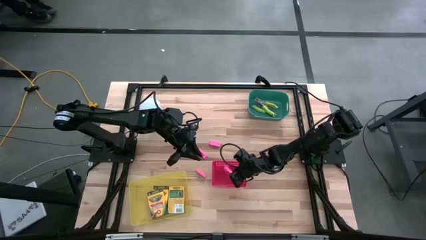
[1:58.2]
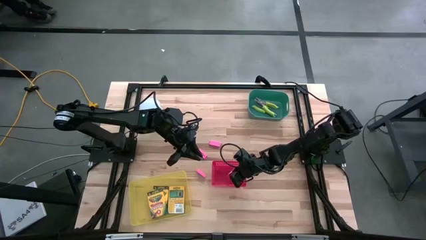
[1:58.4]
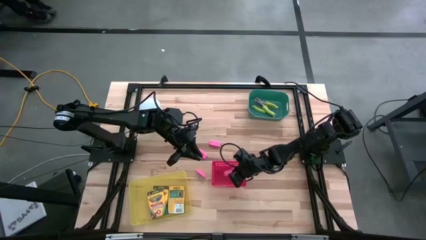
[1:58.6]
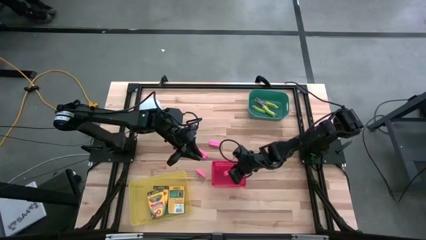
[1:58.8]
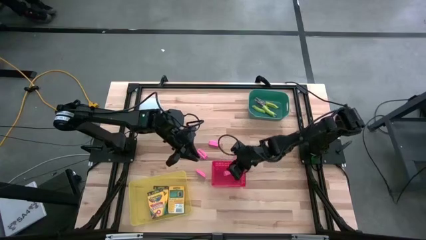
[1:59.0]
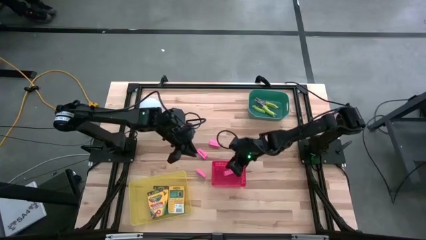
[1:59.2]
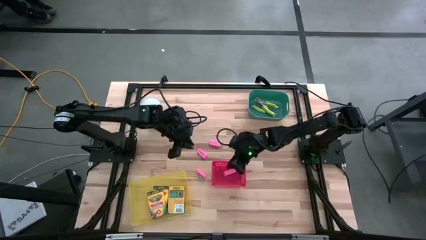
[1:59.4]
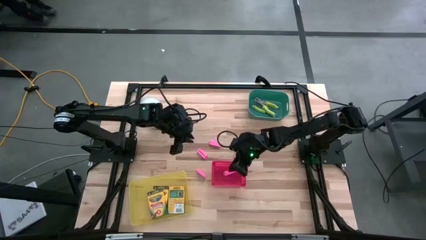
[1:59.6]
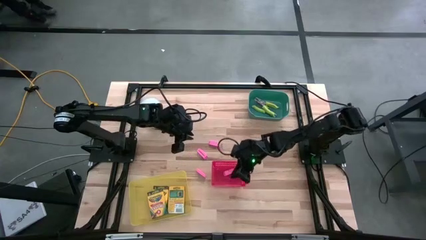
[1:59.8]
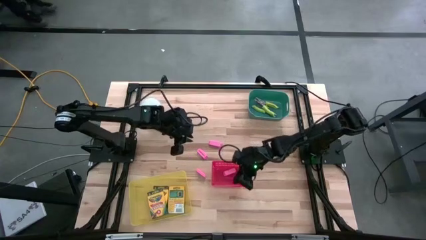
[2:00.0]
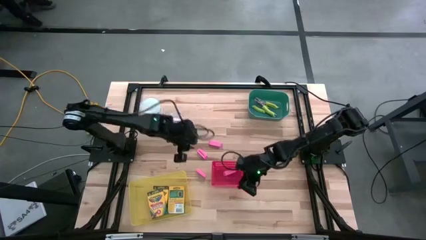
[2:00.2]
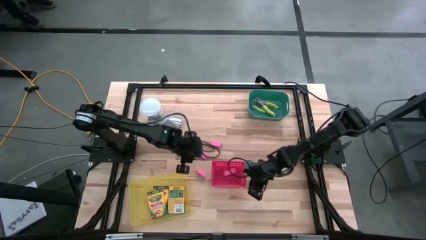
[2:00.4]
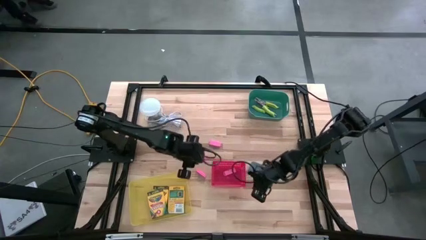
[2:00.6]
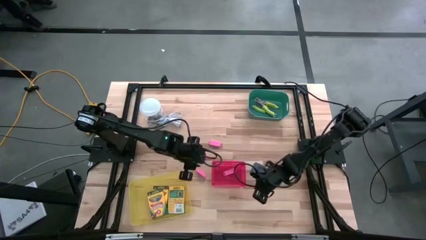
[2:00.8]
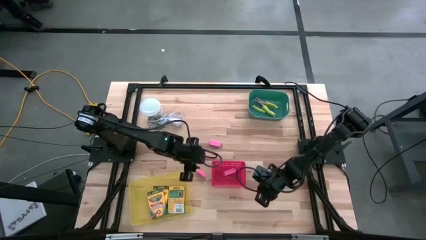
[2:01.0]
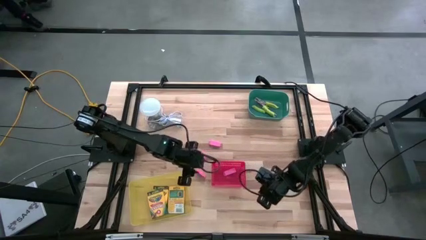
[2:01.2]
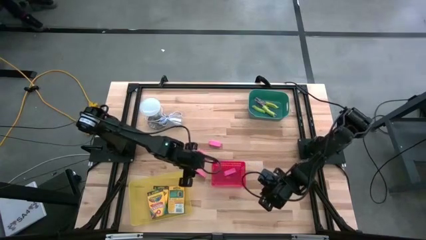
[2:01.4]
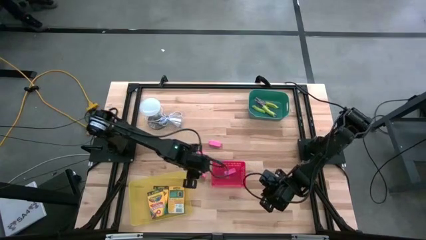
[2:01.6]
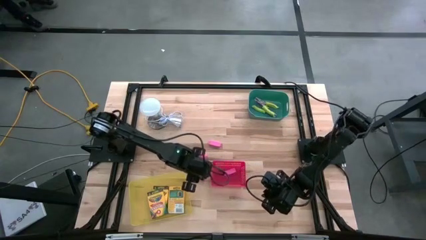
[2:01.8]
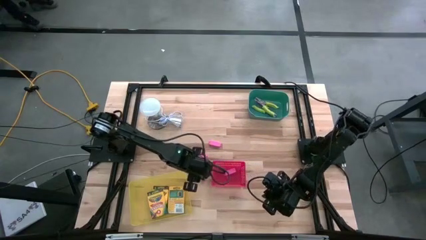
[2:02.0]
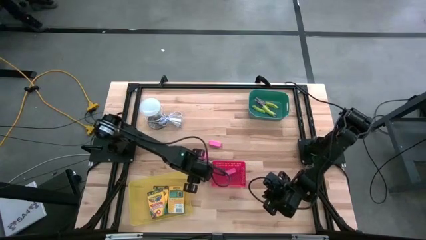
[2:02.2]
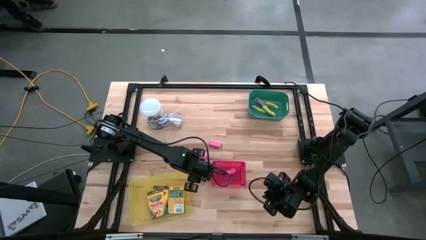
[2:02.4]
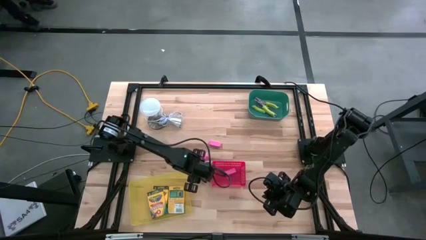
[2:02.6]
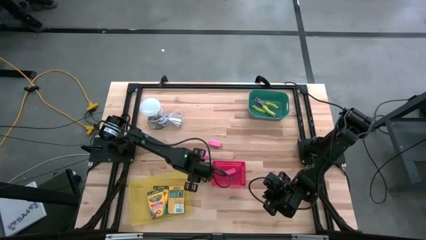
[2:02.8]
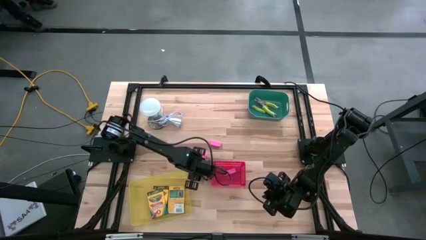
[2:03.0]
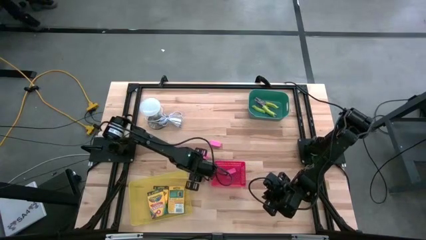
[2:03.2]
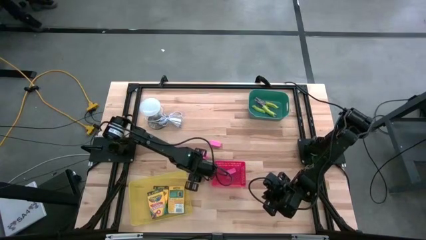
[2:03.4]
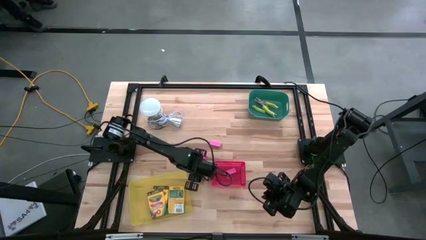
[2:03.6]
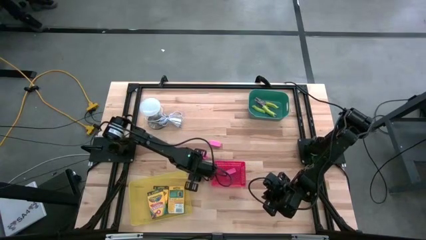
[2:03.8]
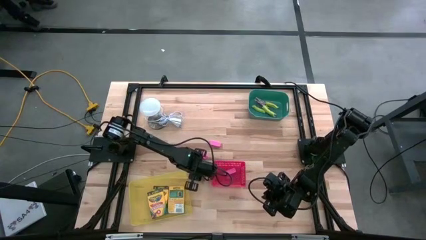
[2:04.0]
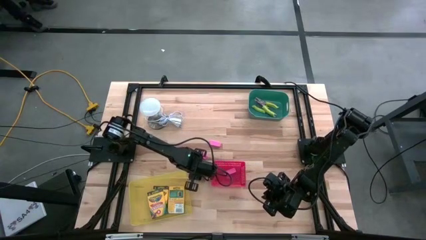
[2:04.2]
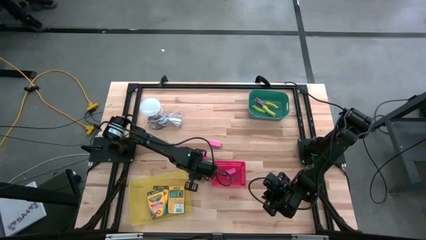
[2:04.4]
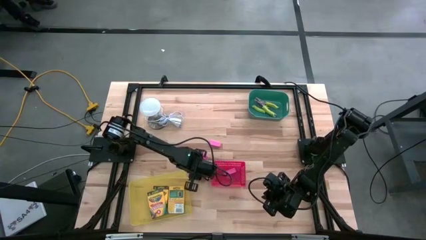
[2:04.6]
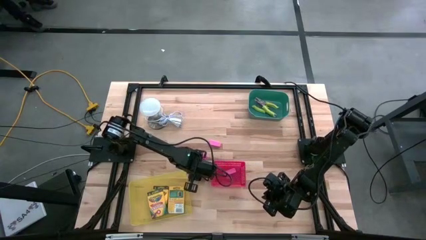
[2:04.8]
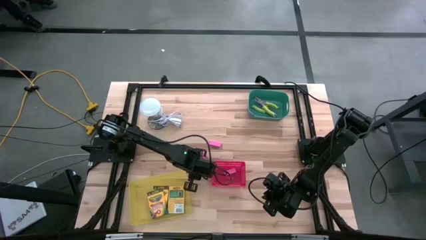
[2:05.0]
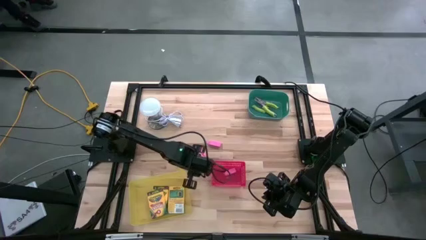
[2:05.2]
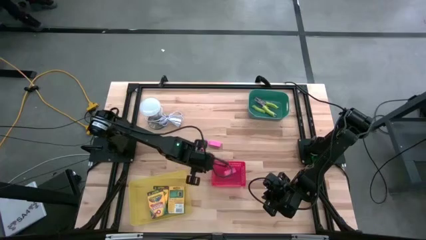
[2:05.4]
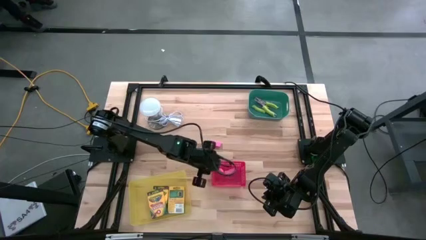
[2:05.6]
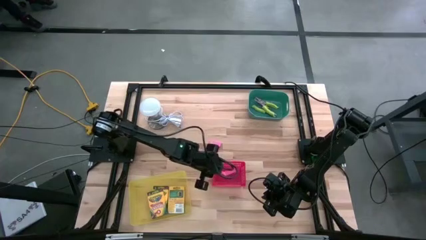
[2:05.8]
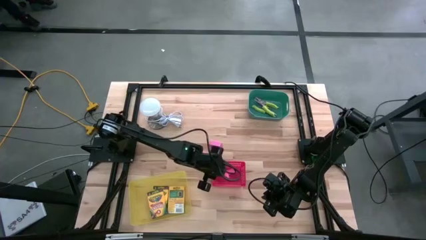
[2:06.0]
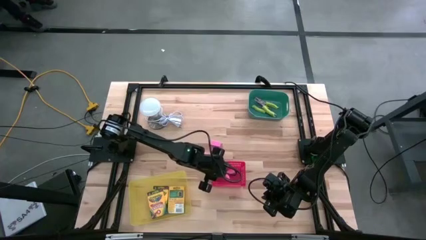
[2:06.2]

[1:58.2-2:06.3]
Task: Pick & Place School Supplies
Put the pink eraser into the red bin

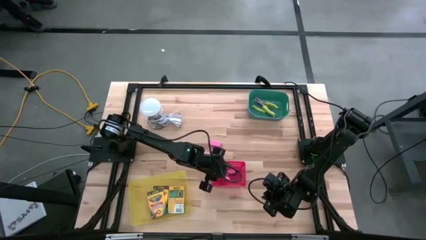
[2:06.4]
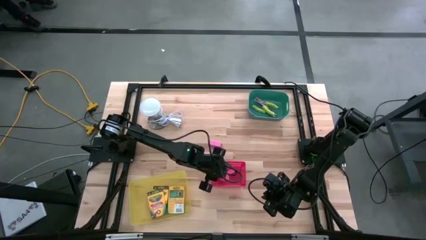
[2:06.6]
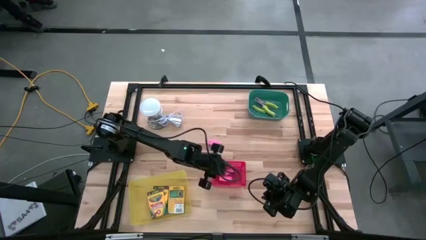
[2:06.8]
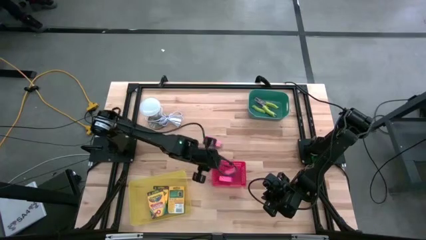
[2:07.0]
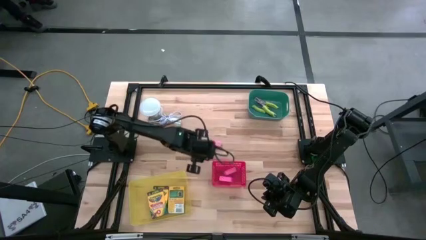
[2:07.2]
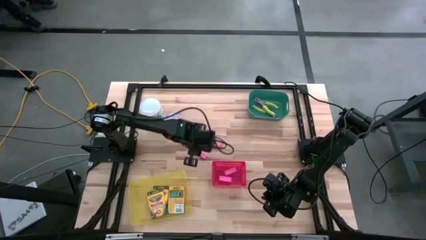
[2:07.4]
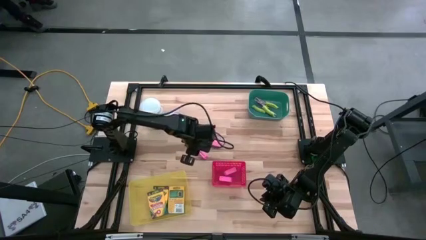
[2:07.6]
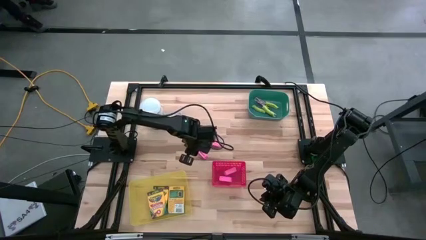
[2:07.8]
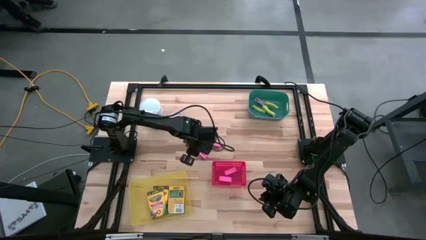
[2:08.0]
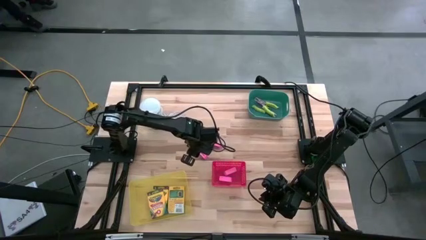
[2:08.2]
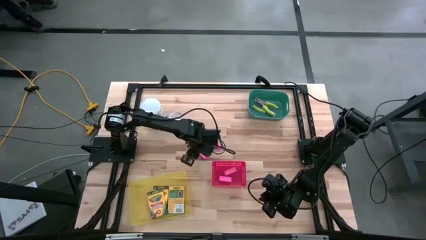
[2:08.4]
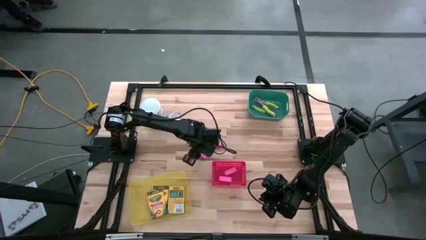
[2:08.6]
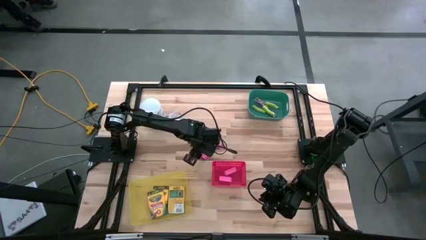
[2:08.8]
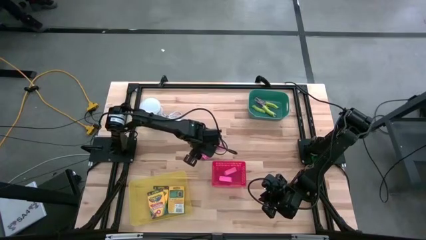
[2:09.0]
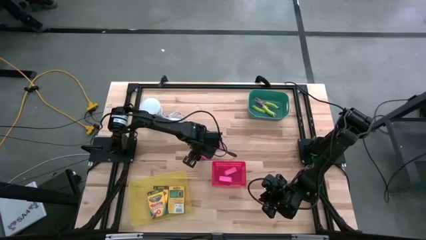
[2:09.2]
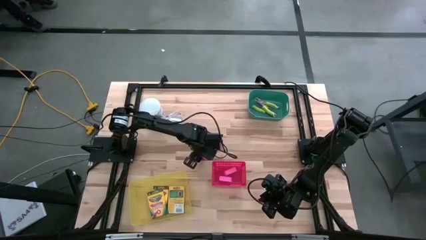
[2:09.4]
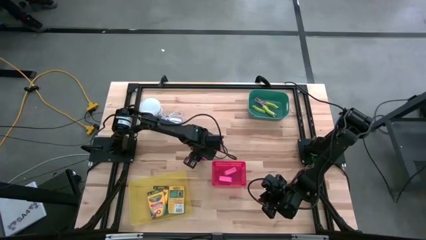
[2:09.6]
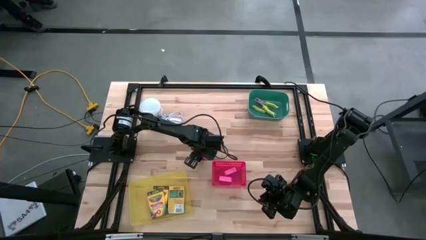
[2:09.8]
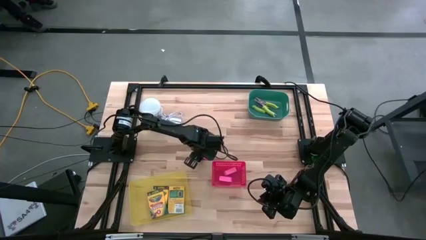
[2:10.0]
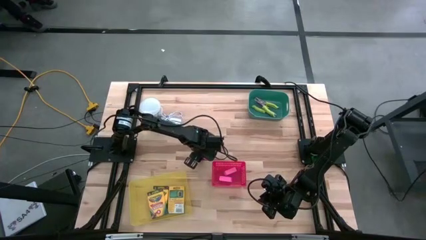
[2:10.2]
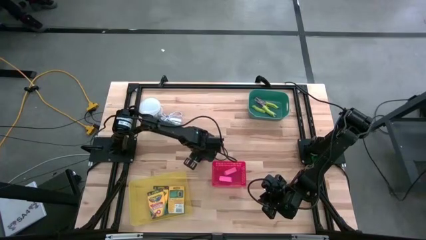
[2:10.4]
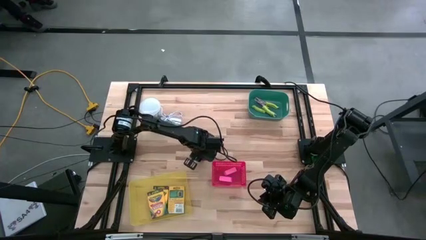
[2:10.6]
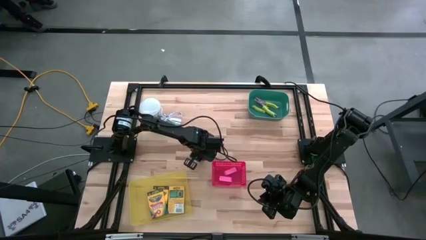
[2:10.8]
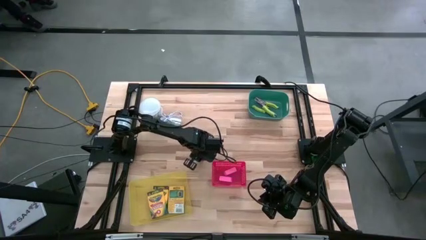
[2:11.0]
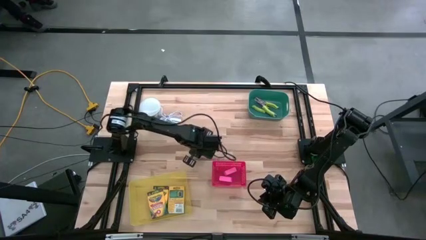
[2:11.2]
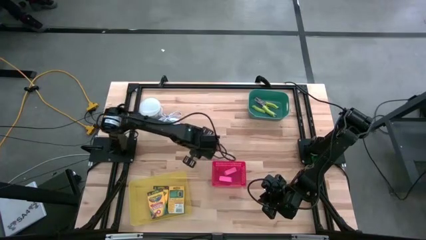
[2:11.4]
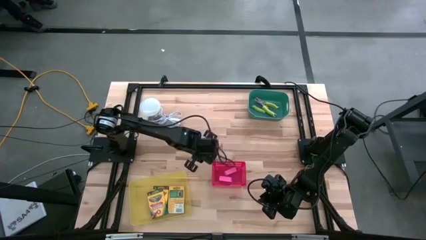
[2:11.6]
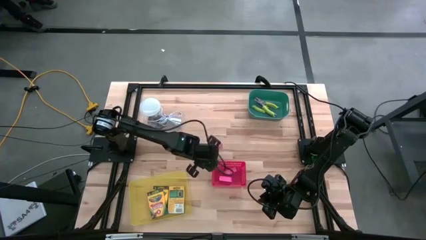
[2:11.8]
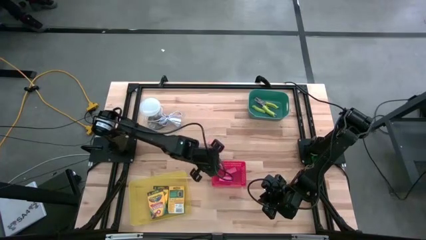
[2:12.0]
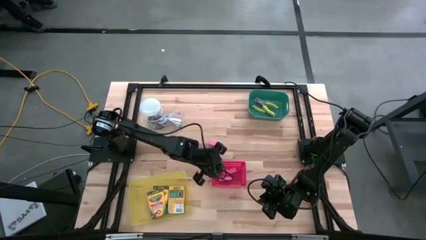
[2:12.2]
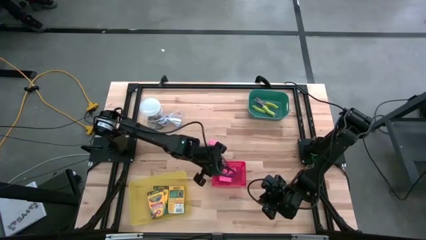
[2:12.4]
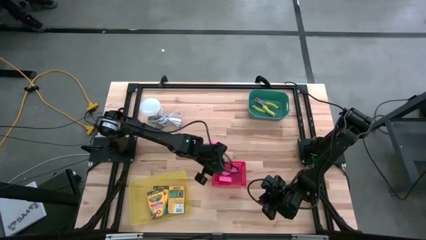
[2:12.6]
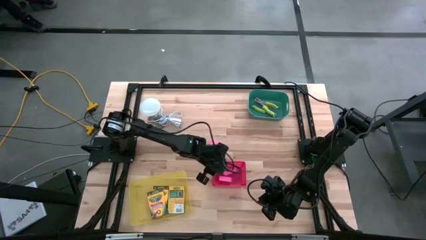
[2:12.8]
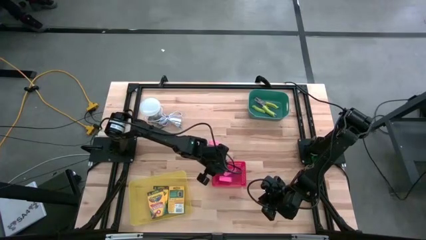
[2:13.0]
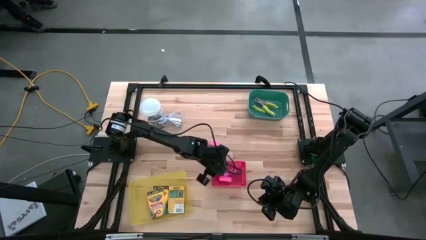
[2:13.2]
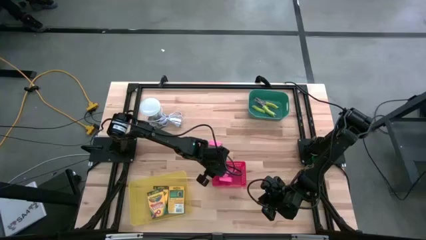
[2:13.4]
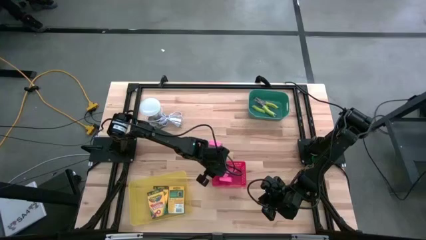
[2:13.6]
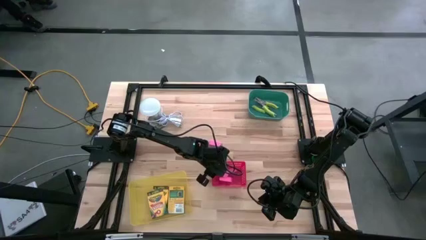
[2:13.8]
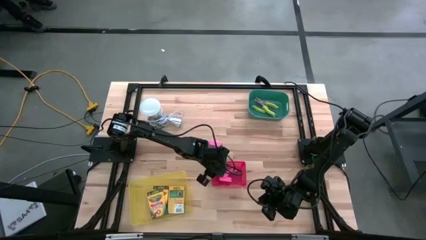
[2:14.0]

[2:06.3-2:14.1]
Put the pink eraser into the red bin
